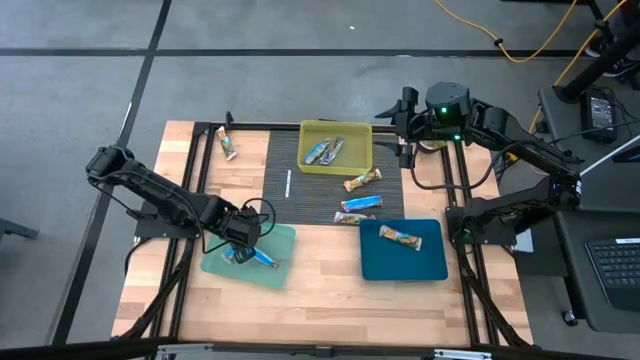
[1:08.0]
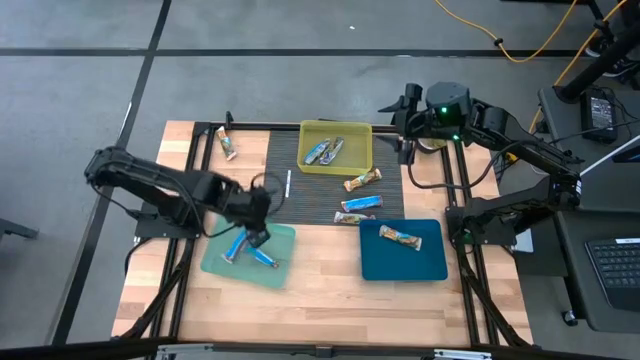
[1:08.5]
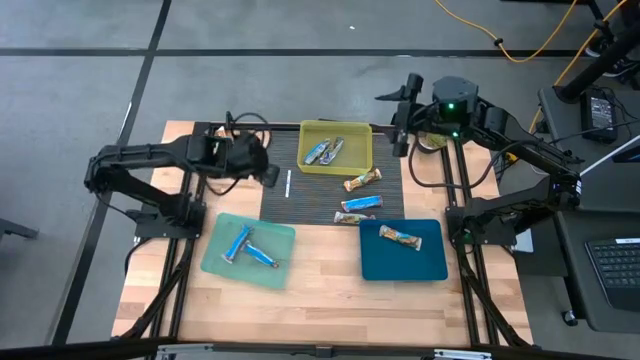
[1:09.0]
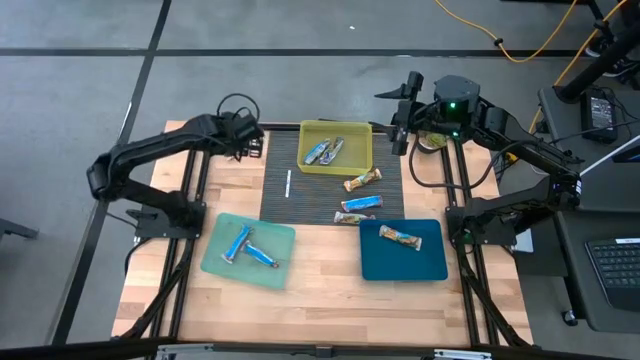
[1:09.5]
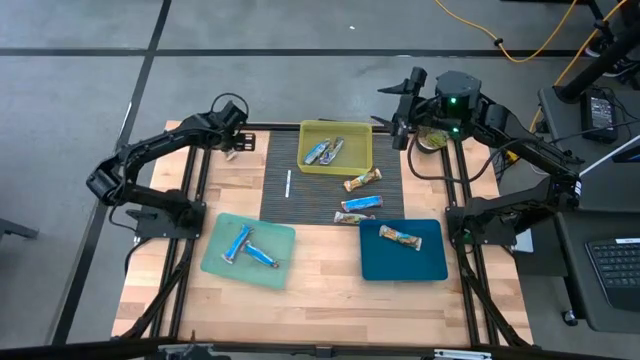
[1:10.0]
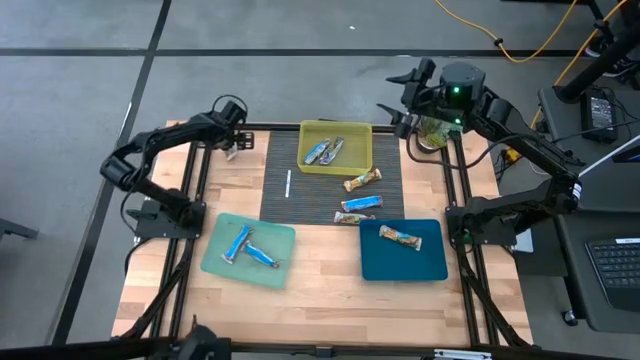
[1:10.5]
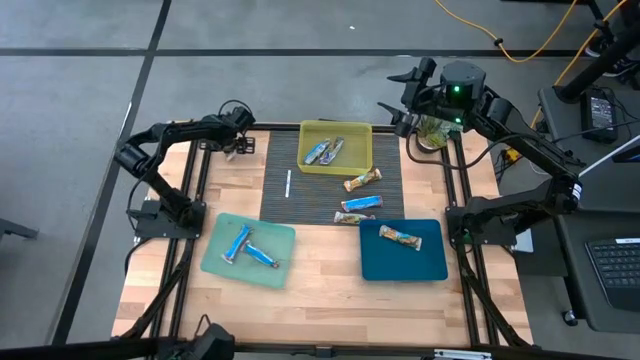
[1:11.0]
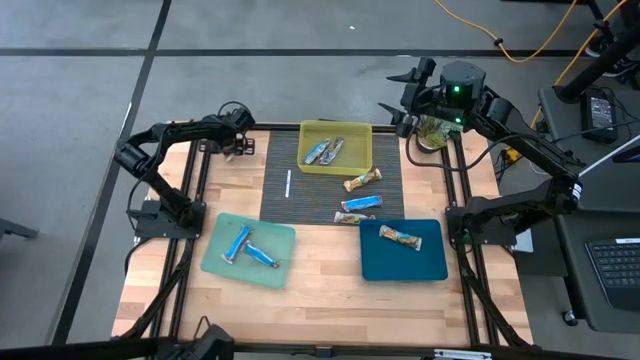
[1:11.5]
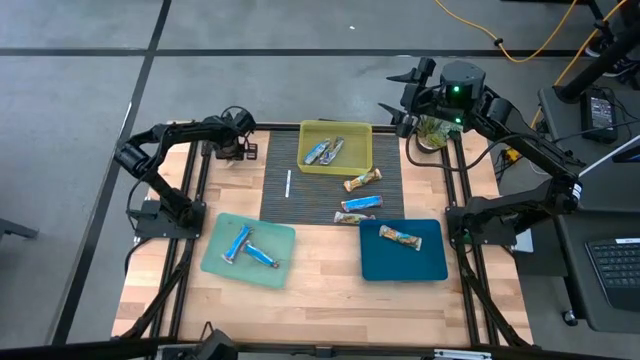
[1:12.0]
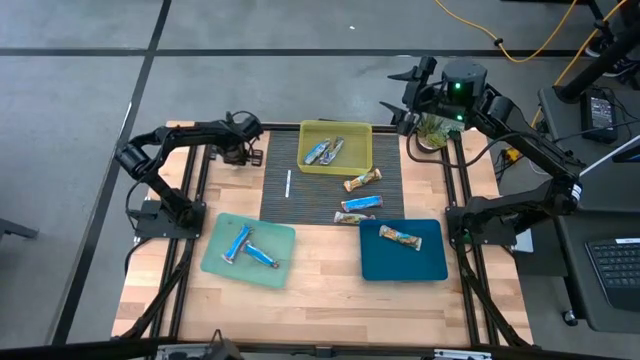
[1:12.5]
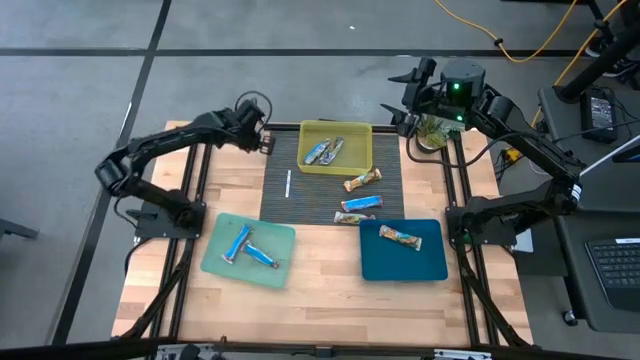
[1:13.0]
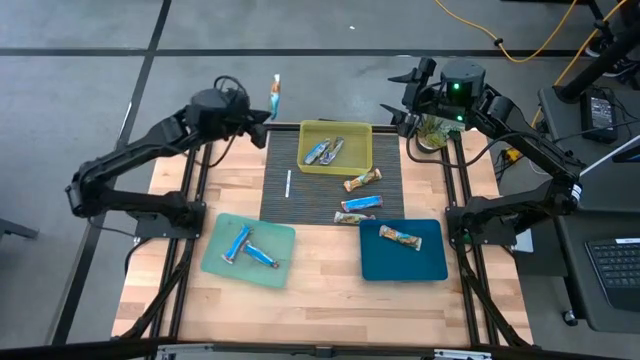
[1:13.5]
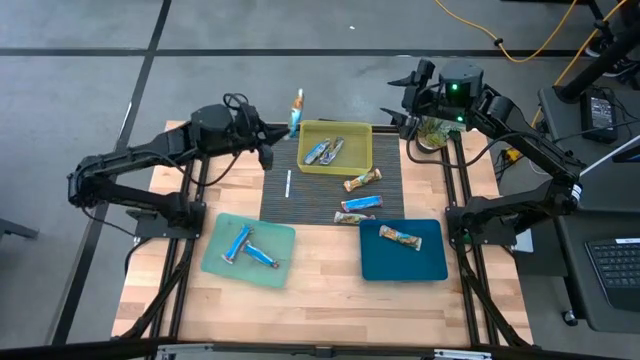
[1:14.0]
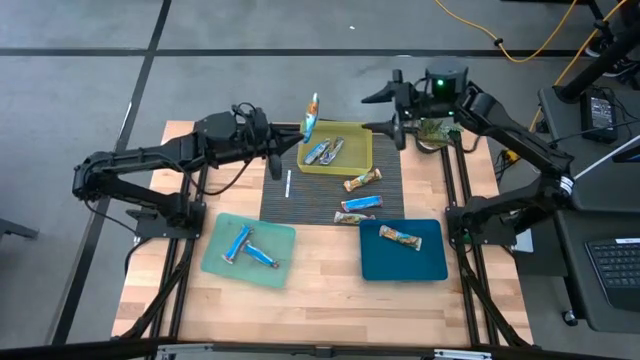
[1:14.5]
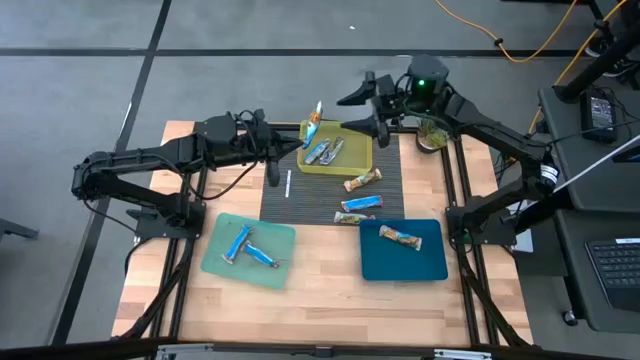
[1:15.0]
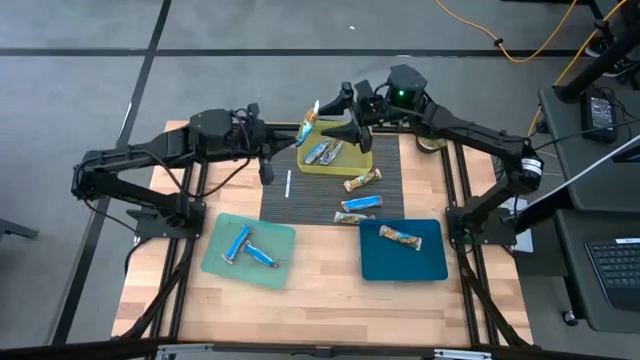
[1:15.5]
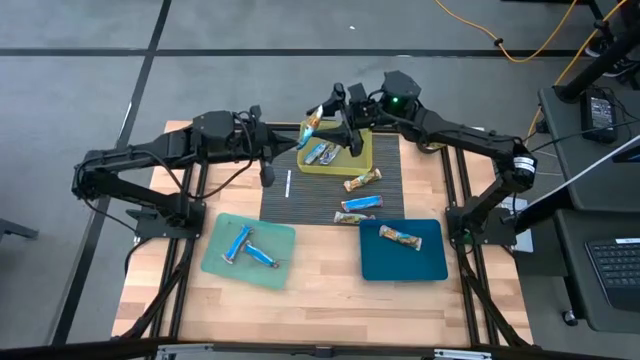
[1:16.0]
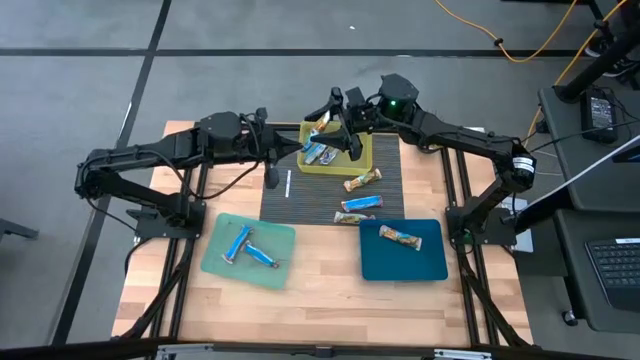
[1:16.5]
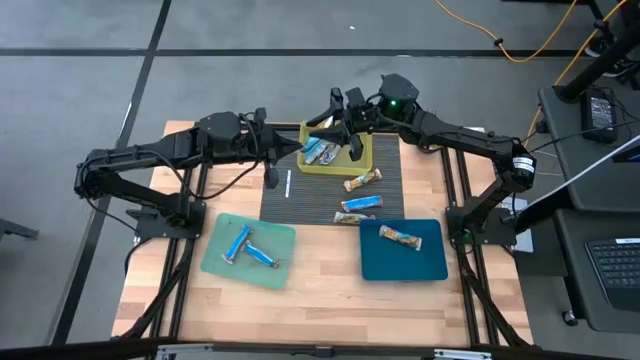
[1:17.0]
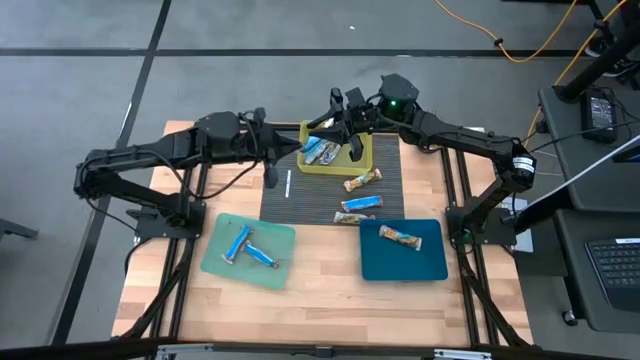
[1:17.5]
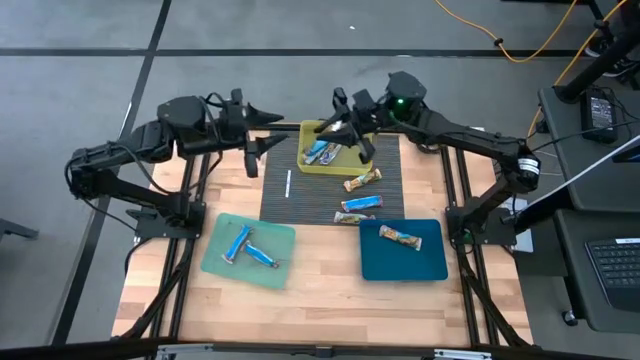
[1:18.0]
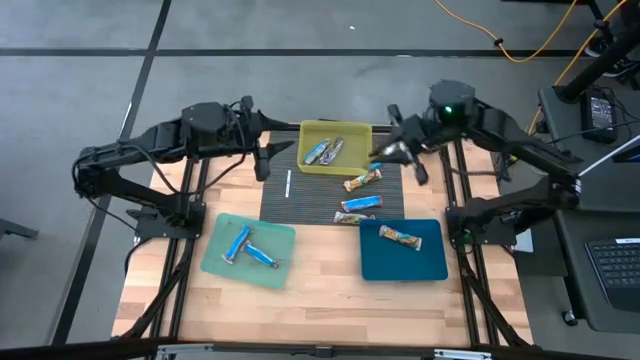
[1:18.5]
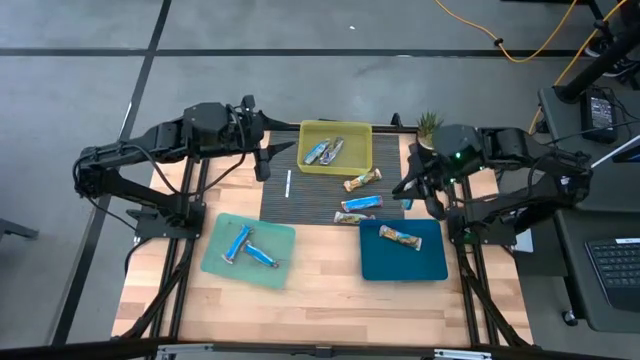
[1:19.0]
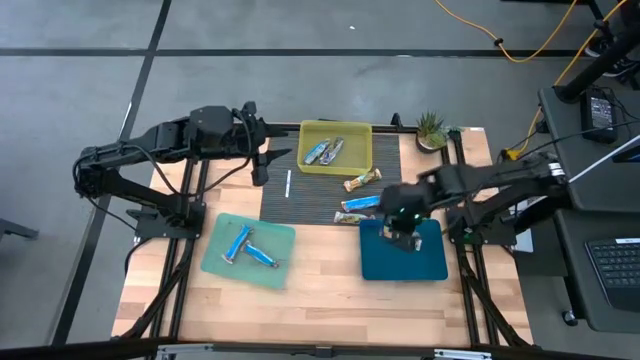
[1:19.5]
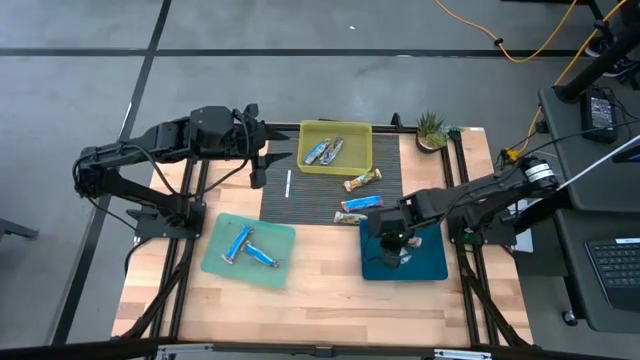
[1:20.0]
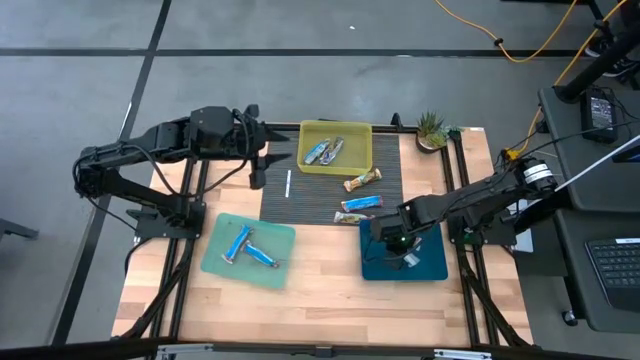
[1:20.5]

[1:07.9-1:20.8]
Task: Pick and place Granola Bars by type
Put the yellow granola bar into the blue bin

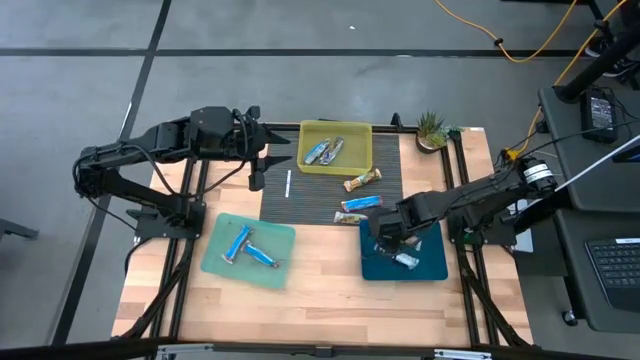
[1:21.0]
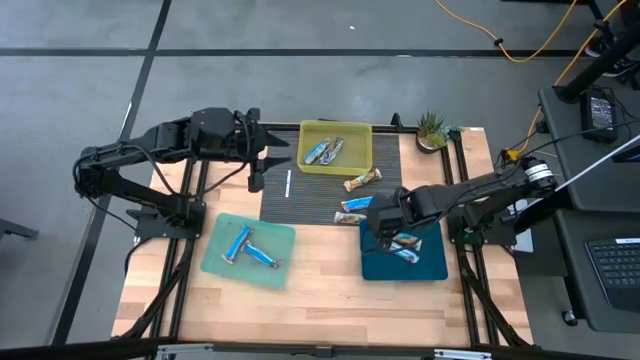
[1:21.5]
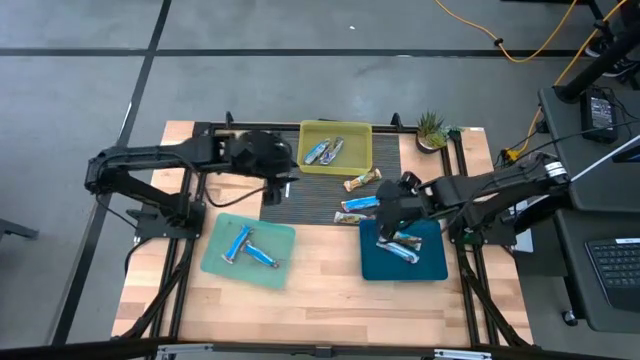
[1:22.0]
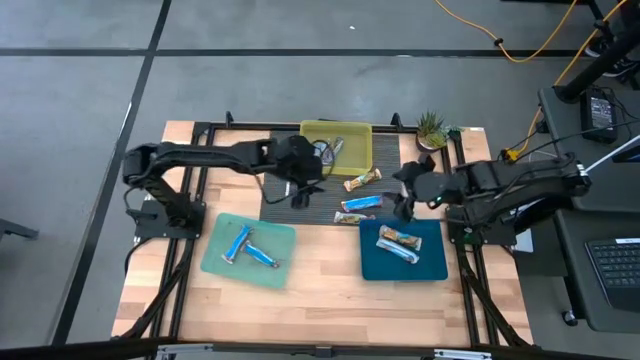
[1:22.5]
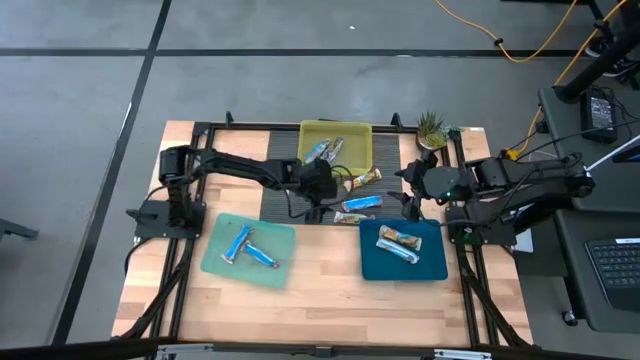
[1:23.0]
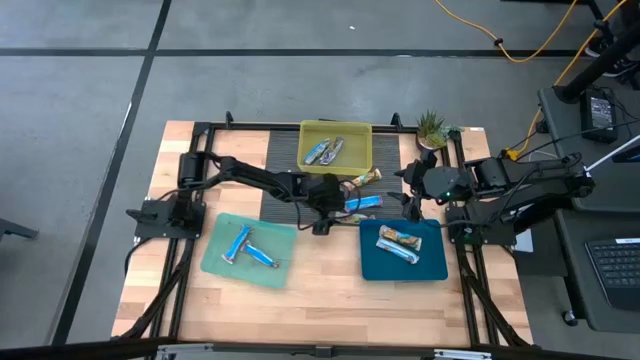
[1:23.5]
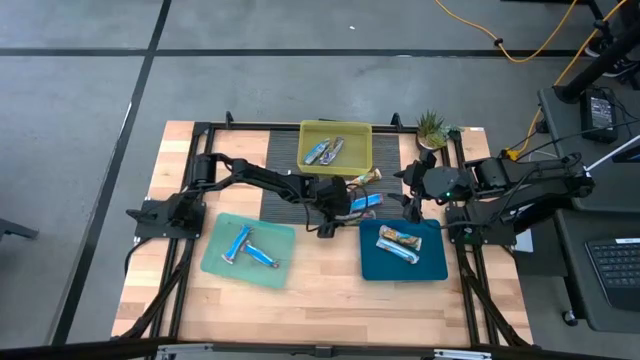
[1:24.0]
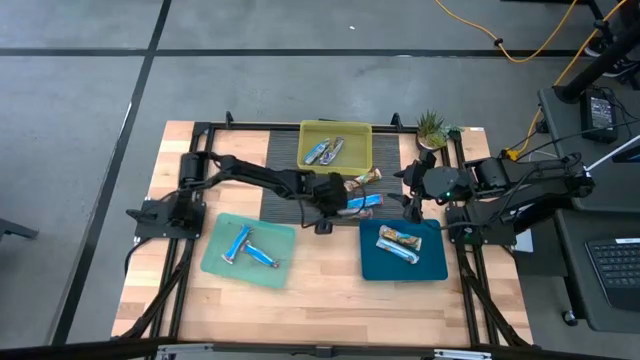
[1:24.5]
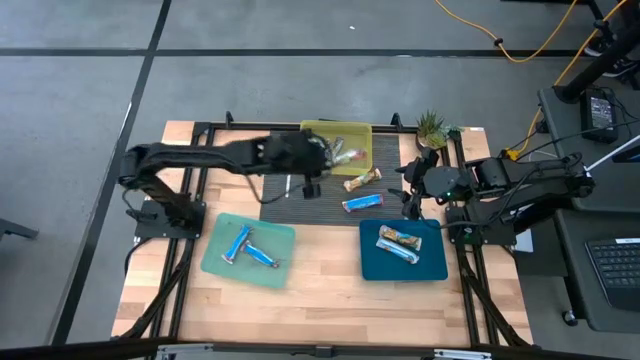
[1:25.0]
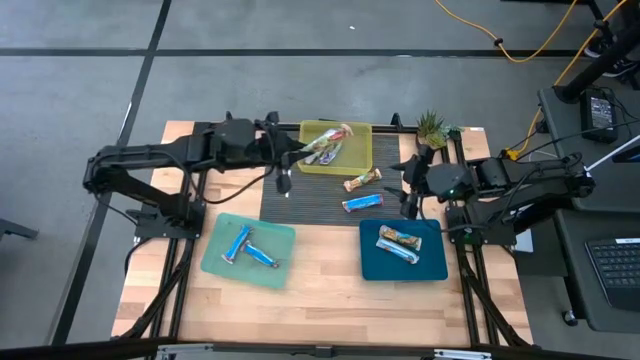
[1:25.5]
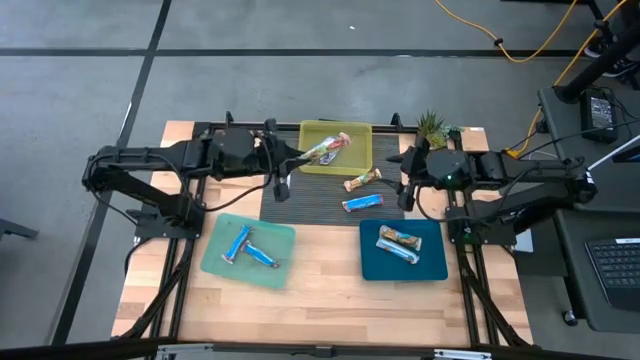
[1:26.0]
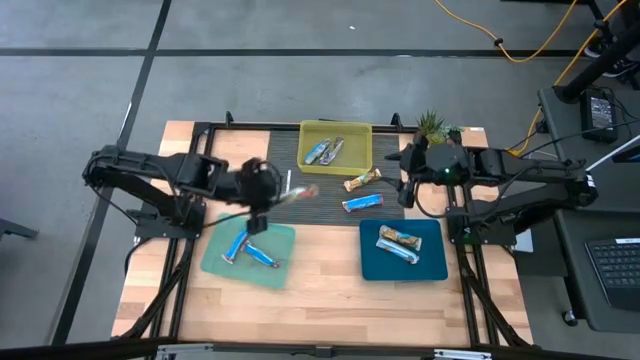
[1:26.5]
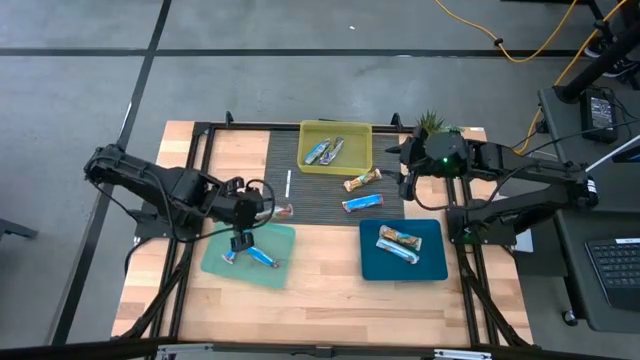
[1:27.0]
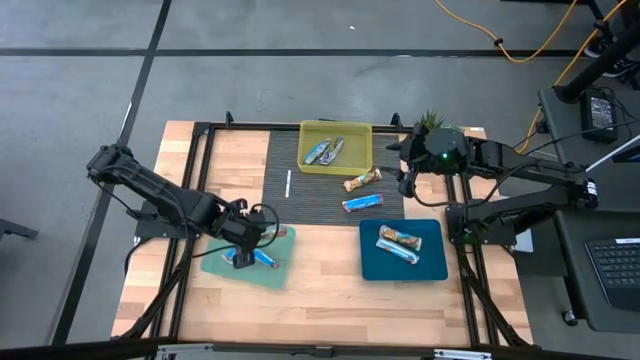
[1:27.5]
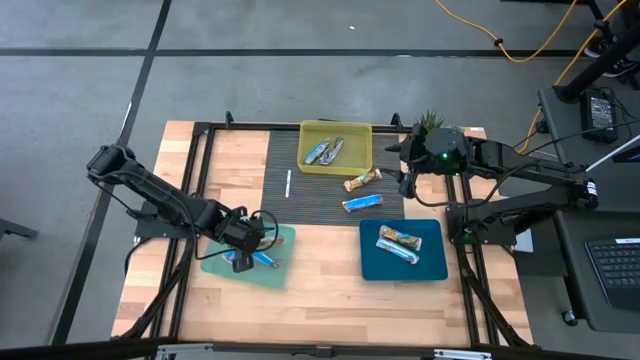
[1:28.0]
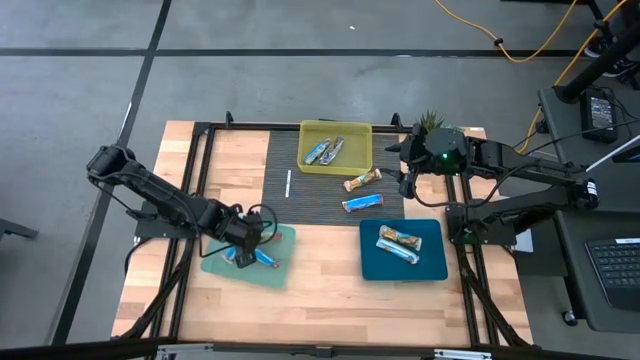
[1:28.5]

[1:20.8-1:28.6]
Put the red granola bar into the green bin
